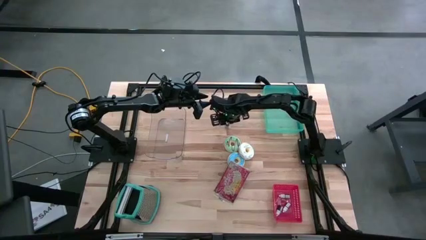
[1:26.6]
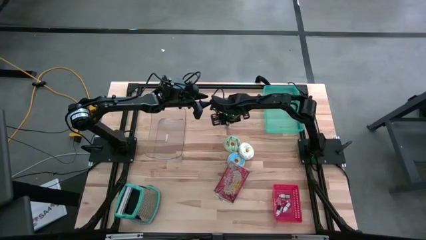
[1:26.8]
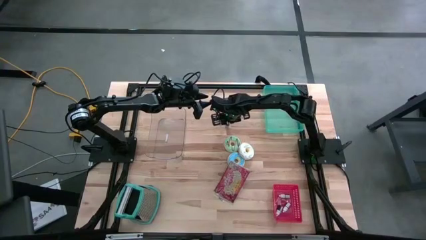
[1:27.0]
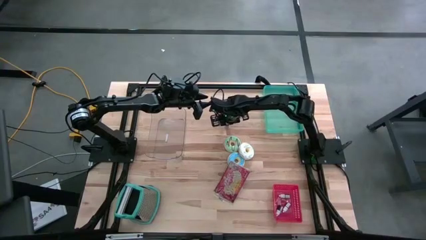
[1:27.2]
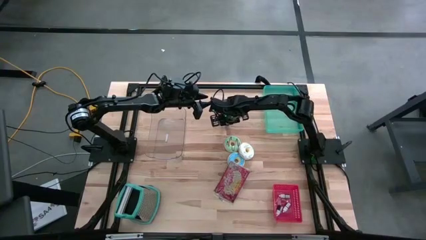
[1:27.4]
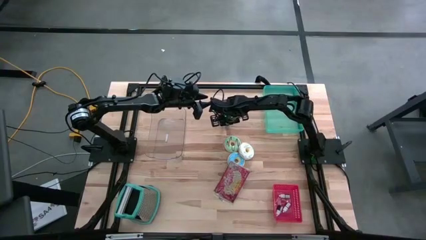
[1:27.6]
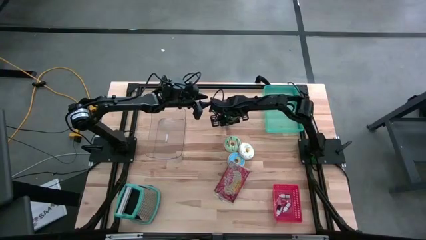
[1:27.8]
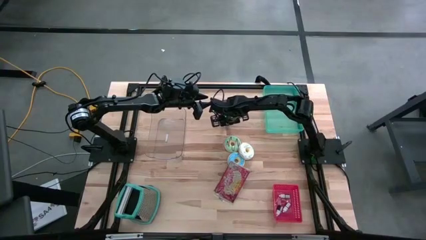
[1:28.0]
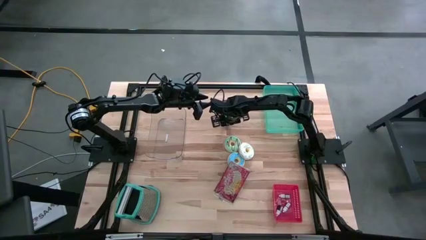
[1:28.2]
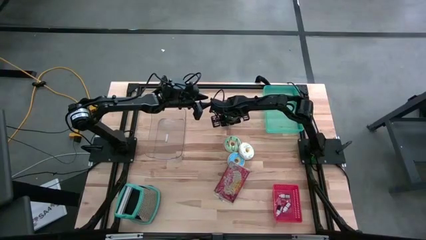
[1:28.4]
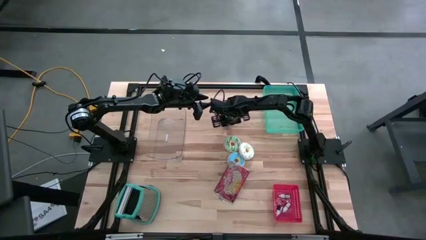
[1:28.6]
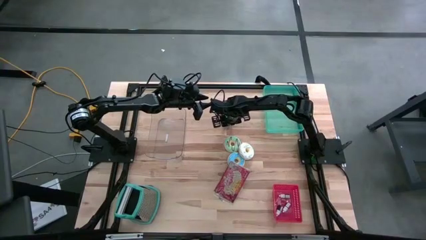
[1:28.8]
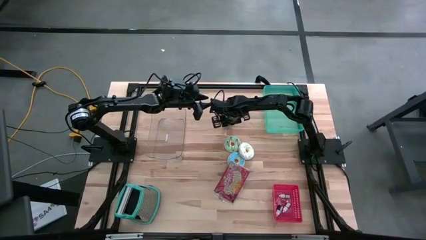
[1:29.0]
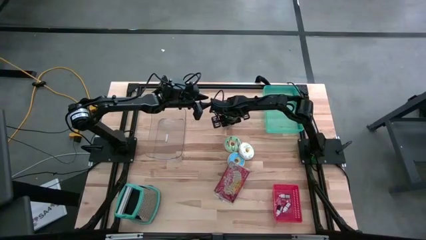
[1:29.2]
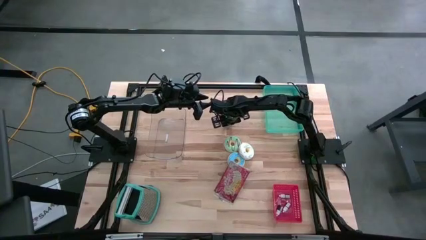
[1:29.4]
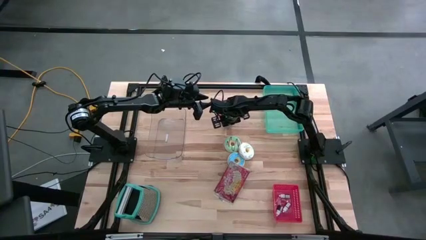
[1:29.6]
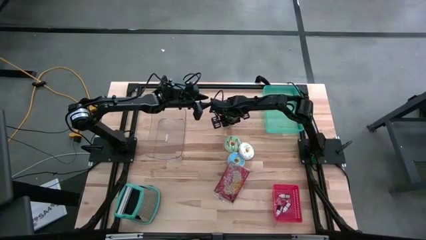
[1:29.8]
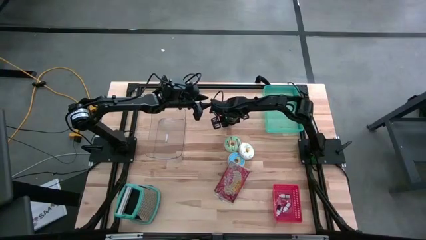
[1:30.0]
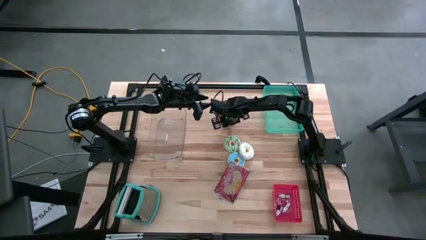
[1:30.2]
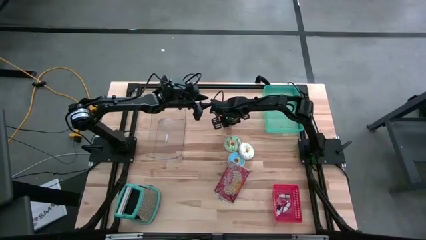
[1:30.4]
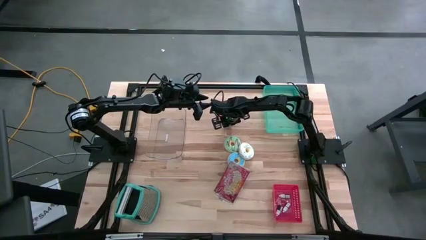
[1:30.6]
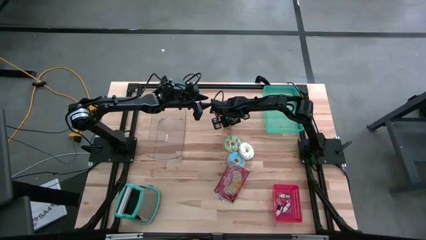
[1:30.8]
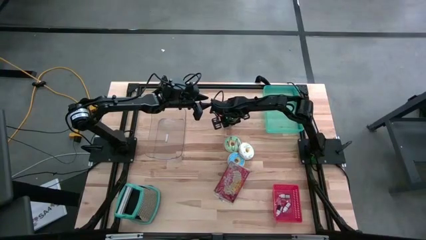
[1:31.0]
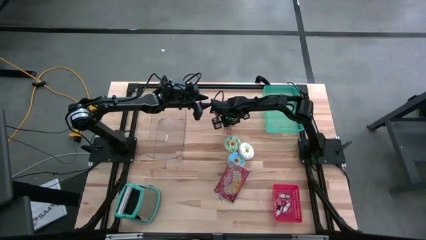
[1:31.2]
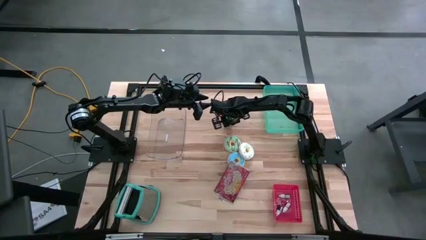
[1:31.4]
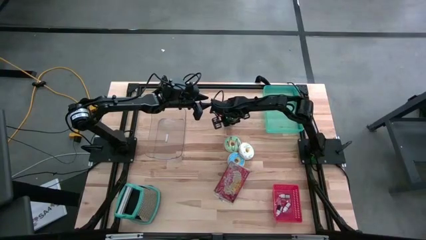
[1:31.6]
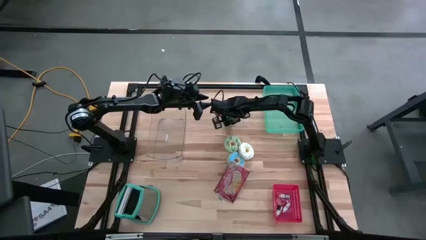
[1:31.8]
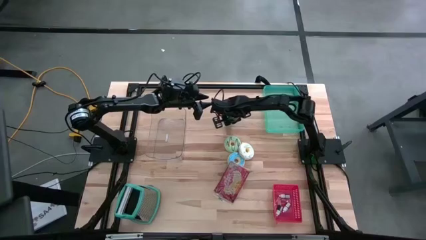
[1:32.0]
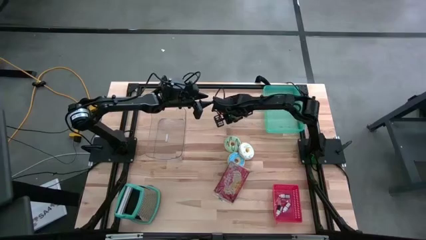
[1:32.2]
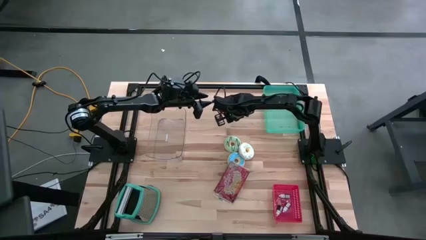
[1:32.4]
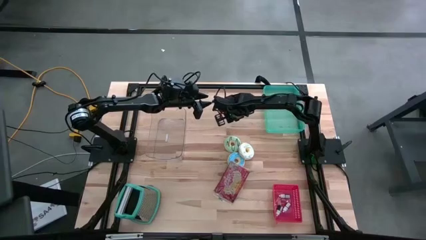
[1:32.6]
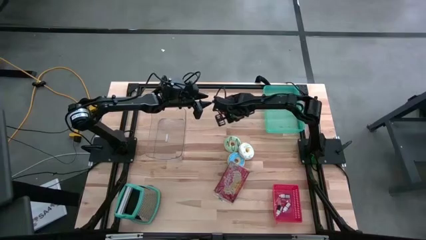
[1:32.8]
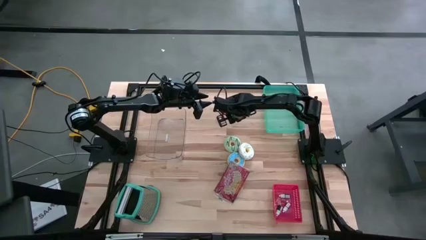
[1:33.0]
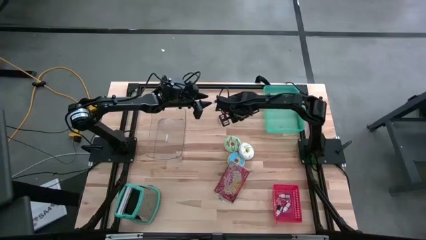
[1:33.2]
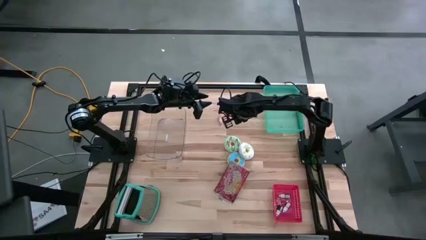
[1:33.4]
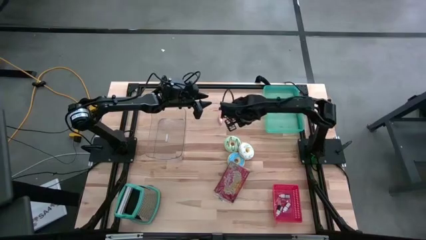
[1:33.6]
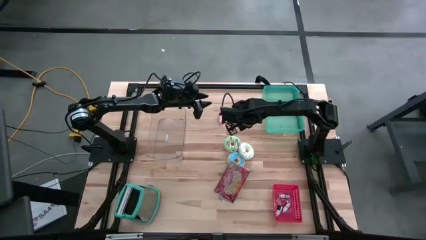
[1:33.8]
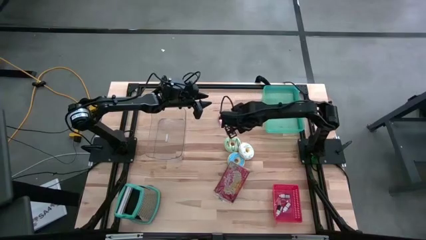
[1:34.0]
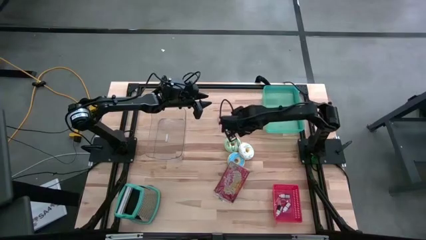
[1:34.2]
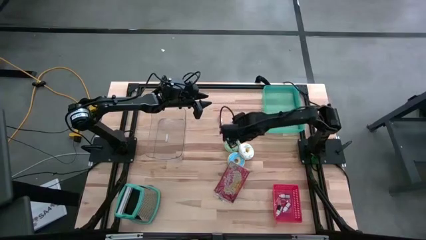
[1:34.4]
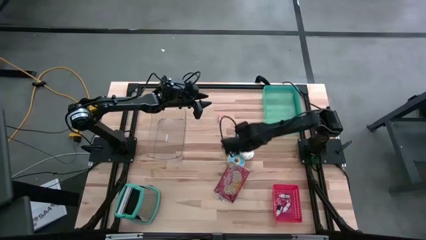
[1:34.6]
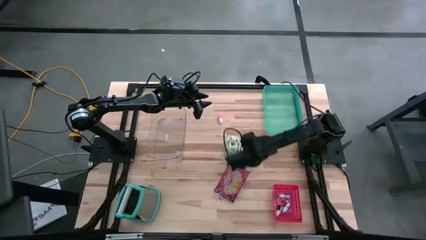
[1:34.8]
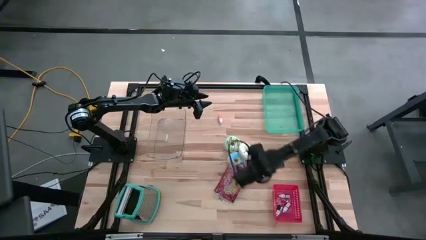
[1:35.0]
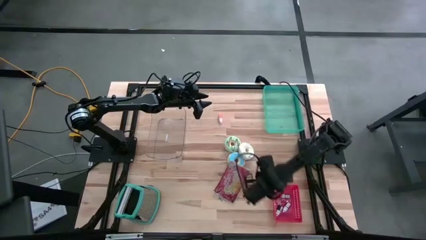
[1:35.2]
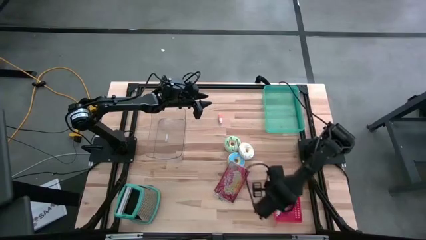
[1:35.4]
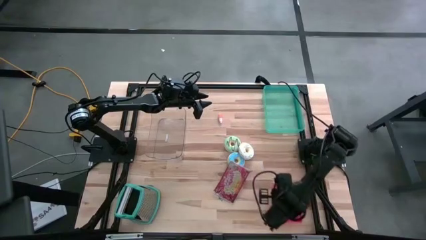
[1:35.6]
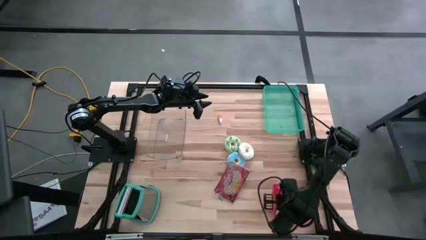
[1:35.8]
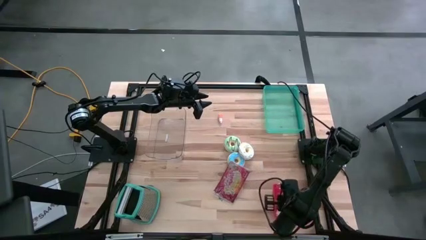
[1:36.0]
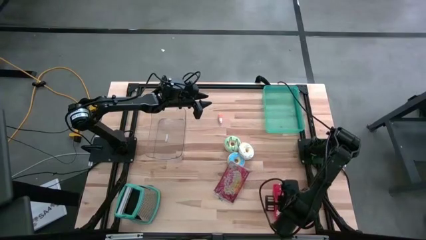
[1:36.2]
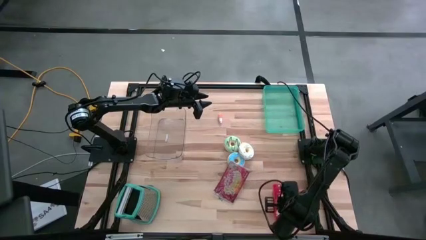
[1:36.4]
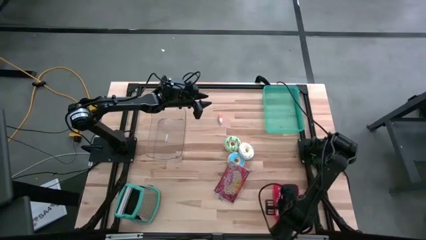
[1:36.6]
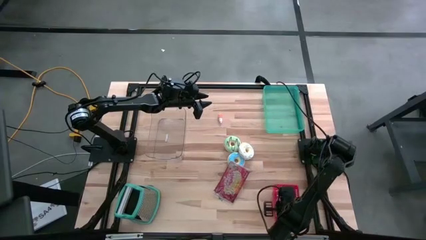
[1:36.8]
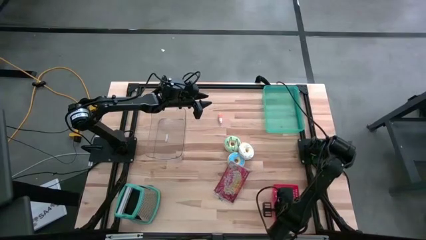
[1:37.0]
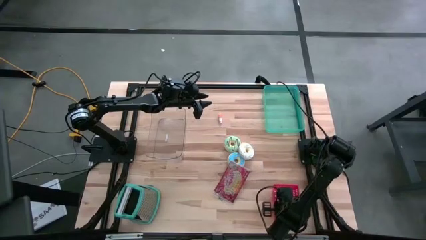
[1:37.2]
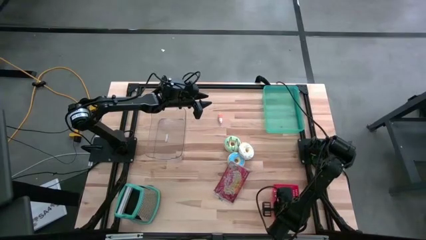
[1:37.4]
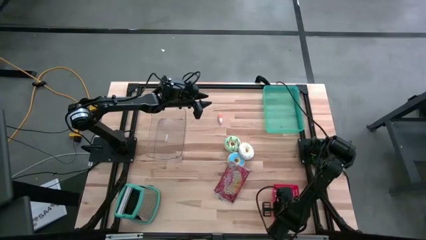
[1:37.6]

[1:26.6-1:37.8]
Put the dark red food coloring bottle into the red bin
